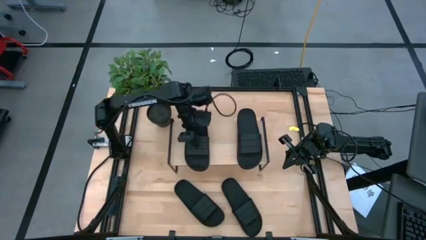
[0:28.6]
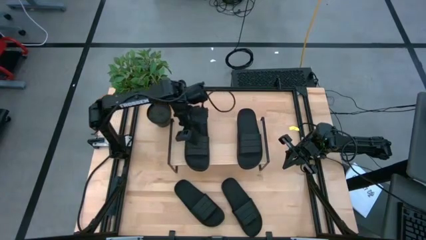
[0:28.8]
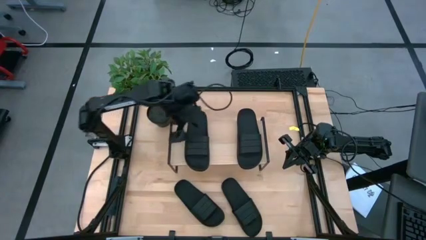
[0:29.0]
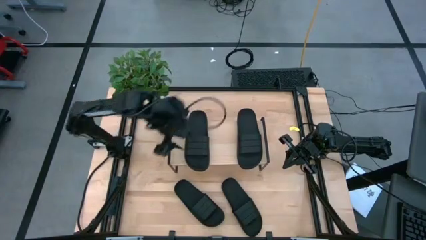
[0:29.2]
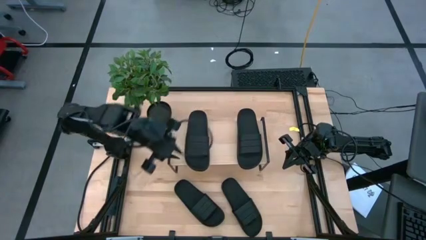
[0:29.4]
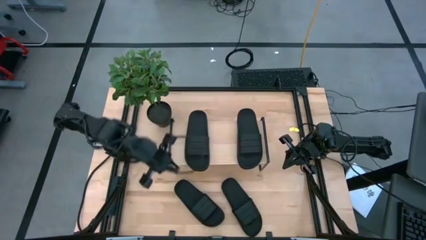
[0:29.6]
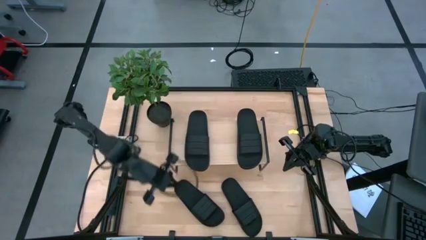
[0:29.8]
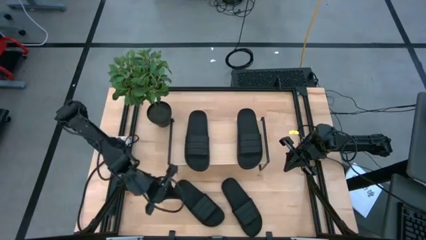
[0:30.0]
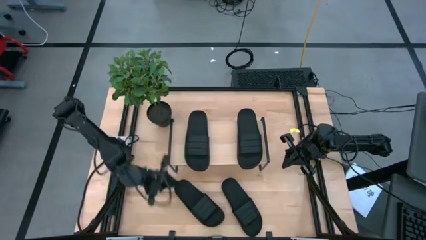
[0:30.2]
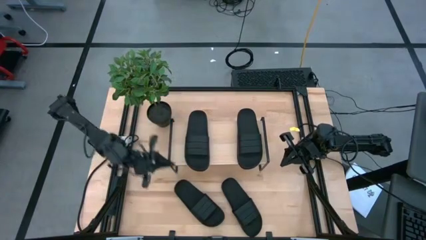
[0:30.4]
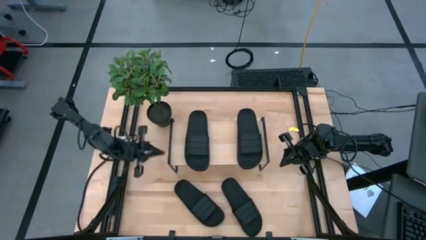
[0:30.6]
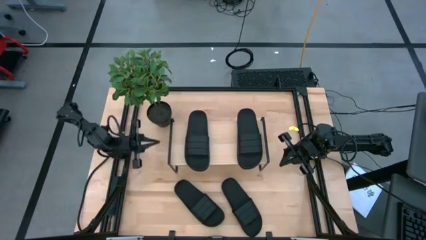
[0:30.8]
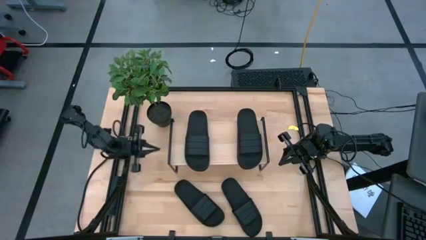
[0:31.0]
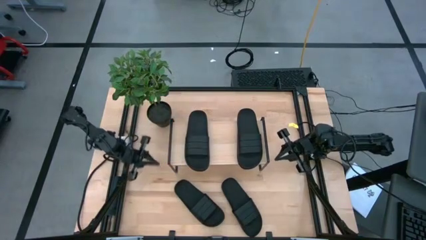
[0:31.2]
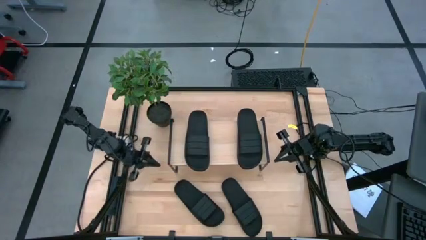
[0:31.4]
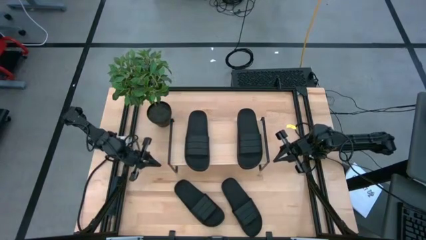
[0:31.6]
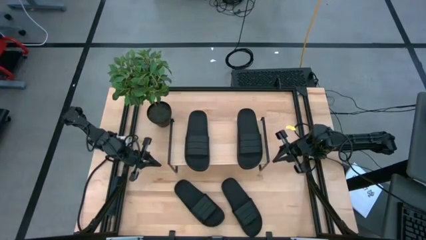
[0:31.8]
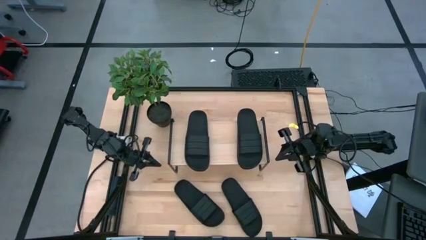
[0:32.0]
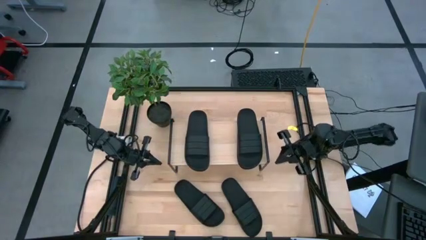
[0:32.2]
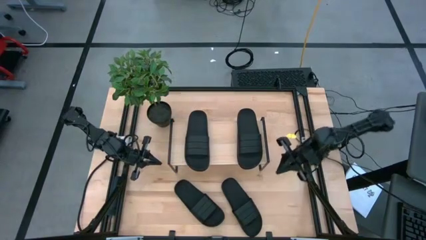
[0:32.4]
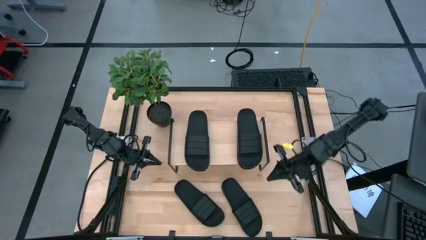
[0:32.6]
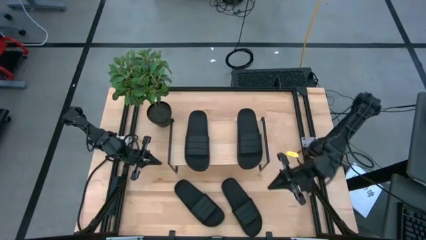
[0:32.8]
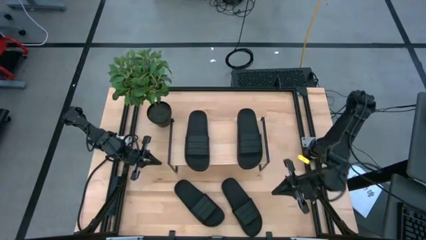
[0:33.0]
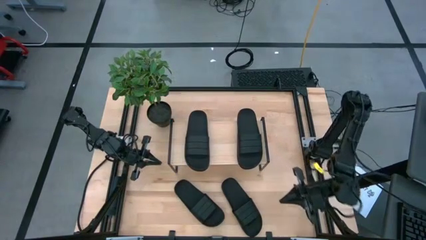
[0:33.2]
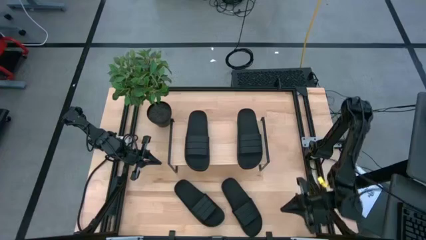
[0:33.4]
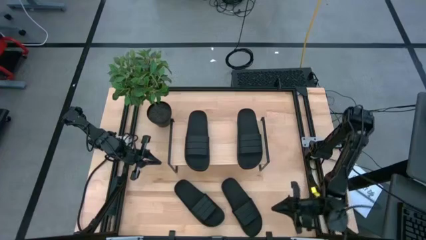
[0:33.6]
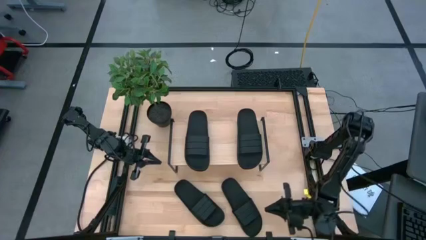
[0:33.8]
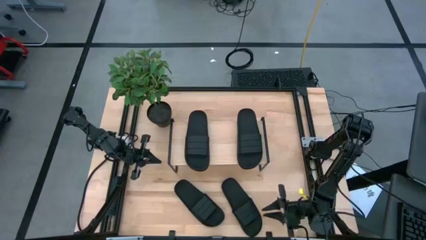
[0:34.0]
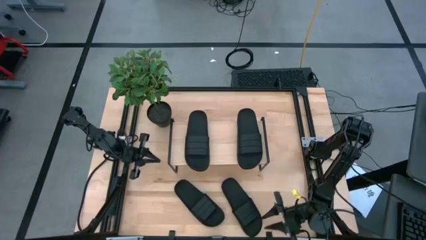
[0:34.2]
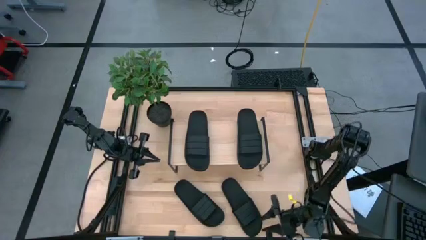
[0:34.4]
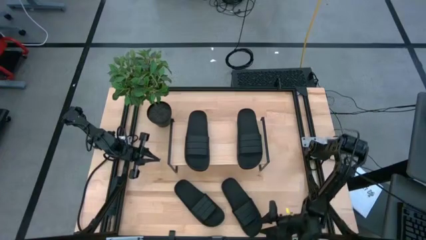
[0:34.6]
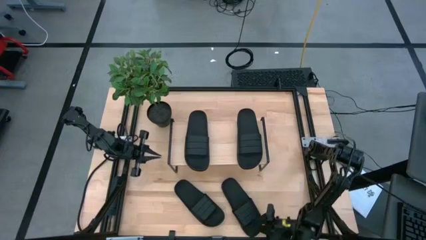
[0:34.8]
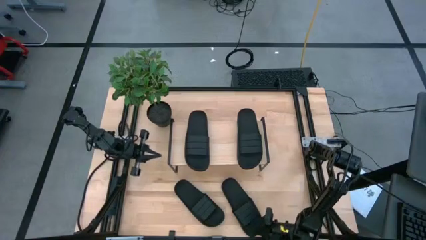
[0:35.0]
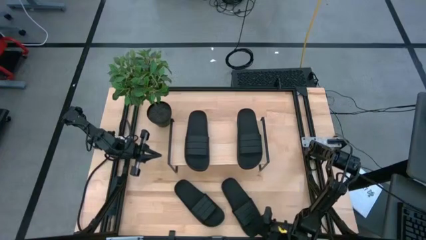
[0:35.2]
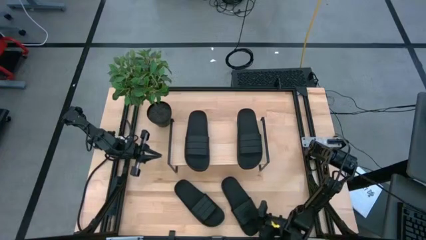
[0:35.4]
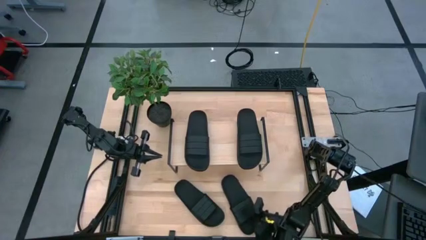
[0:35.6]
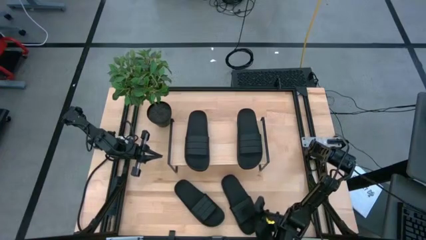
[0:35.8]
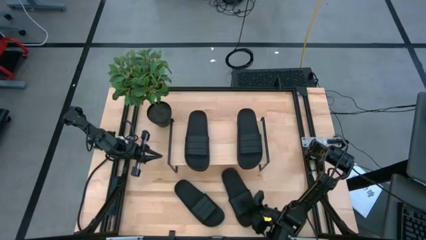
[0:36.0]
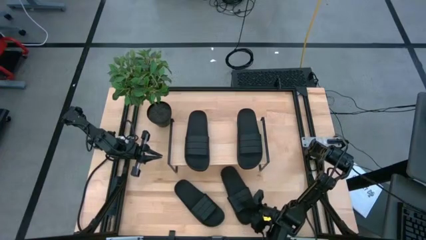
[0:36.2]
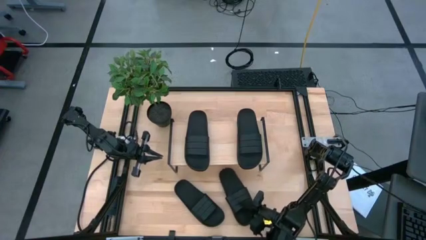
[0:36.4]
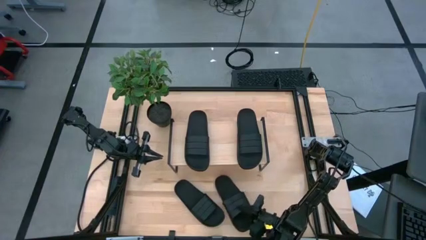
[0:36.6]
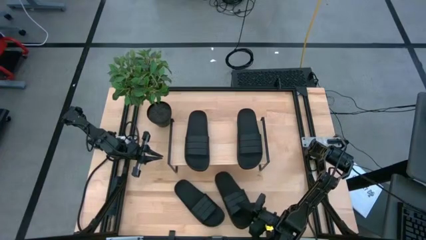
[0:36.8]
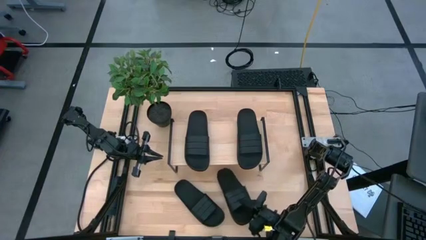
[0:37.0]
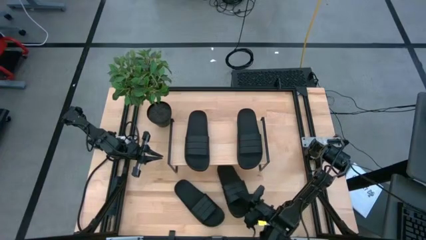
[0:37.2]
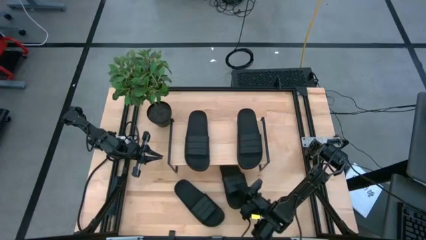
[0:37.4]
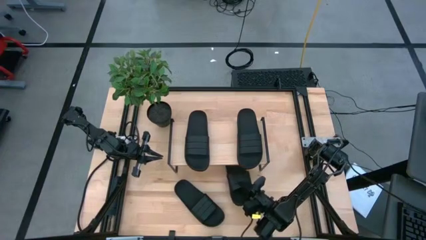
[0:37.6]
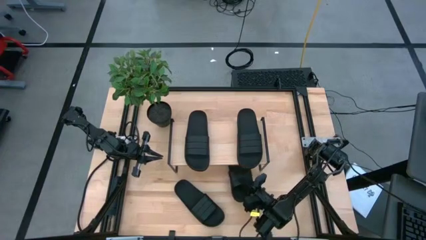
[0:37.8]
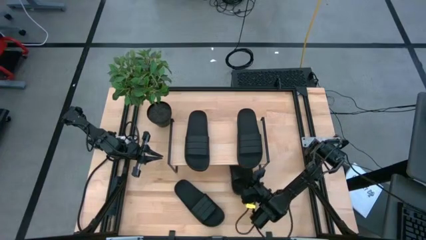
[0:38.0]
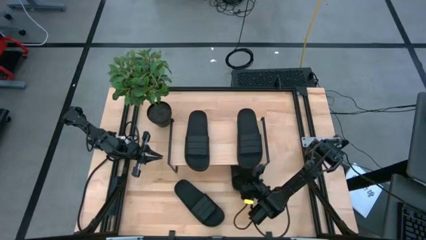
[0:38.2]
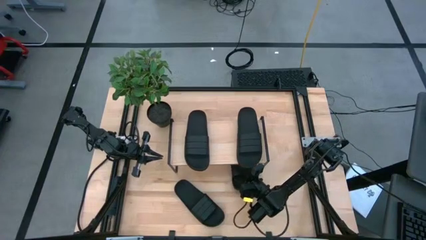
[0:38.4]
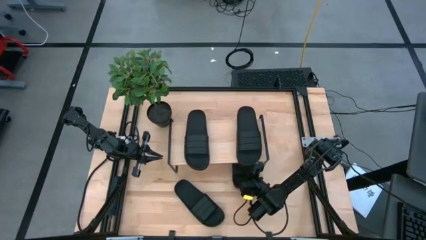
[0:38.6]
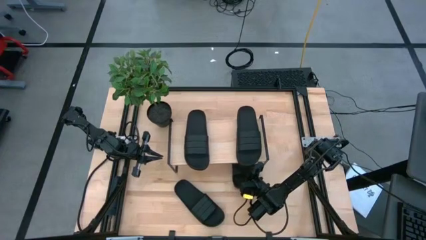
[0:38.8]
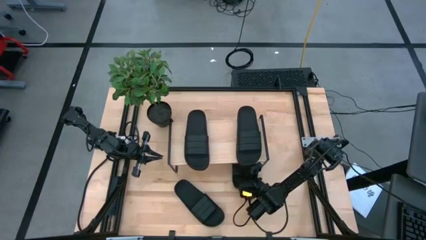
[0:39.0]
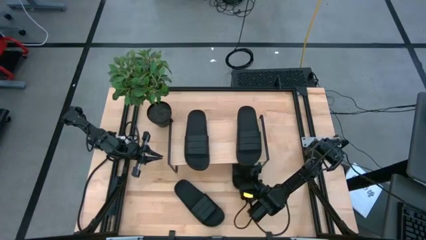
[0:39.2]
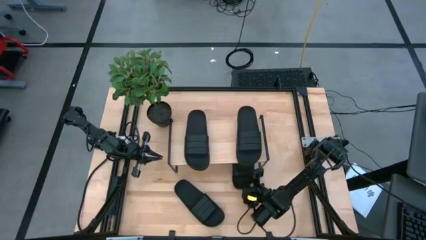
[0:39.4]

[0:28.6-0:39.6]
Task: Pick and place slides into the shelf
Put the black slipper under the shelf

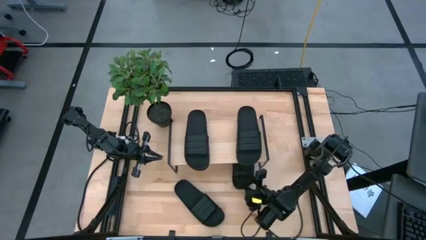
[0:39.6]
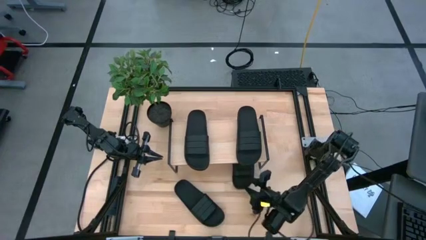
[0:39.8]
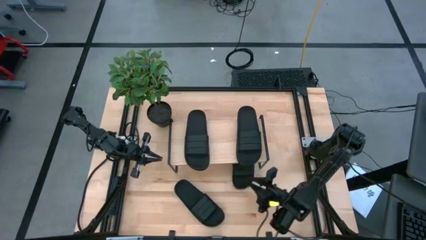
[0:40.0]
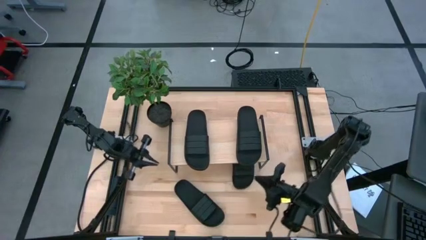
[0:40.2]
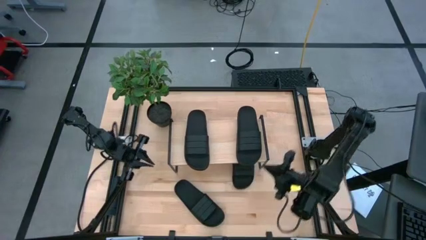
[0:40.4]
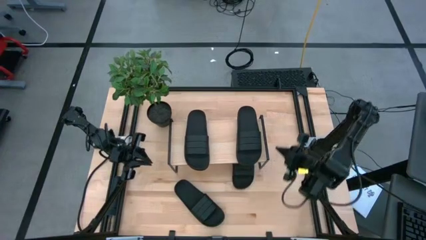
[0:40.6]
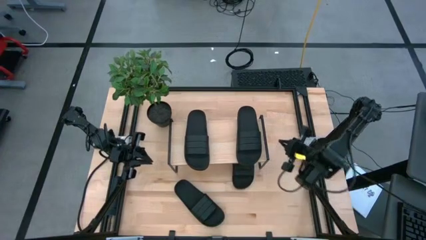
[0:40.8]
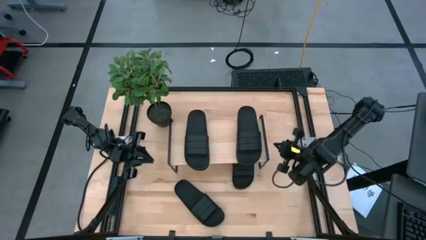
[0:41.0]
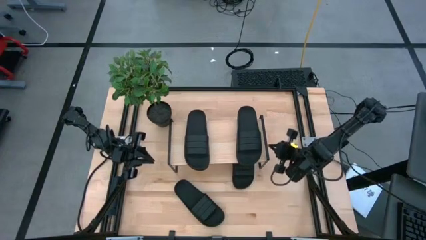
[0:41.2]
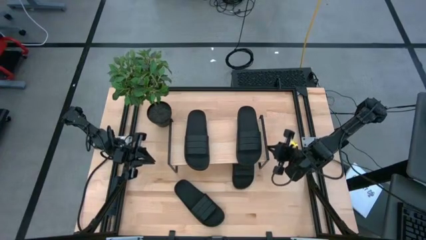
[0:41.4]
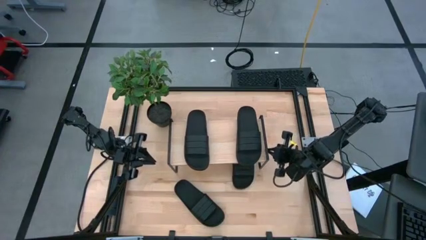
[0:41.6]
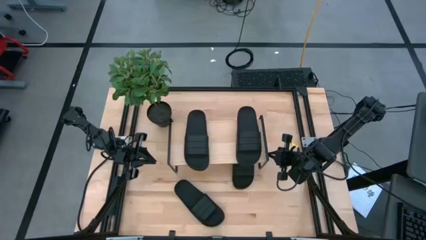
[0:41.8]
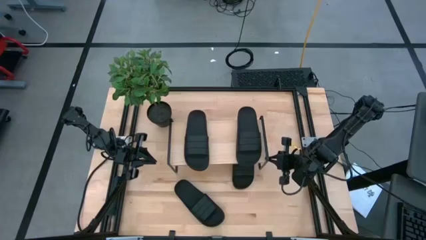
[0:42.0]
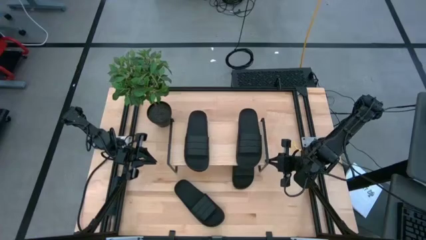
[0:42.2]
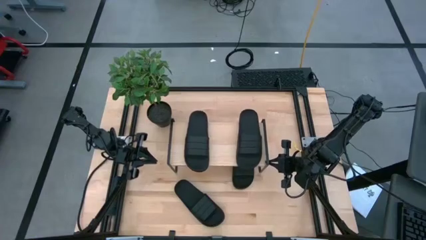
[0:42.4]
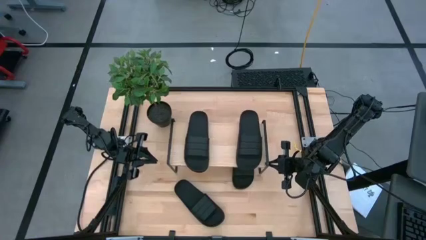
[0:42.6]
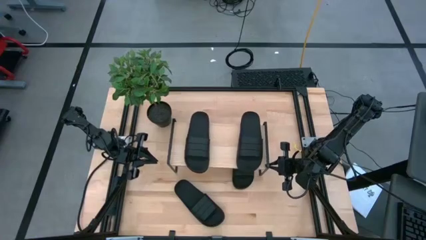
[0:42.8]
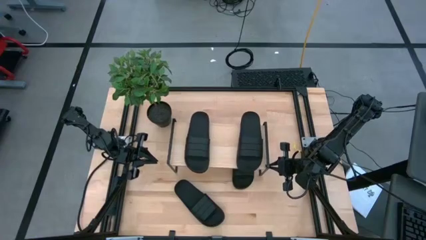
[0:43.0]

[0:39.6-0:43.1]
Adjust the shelf

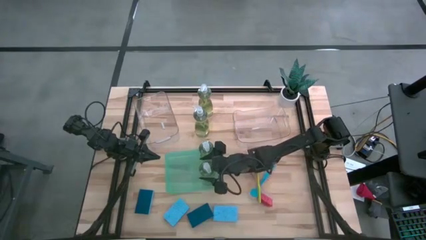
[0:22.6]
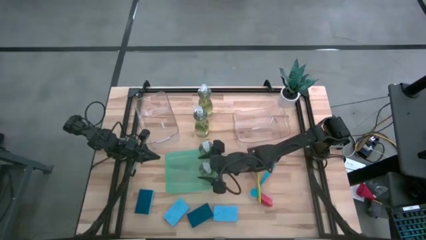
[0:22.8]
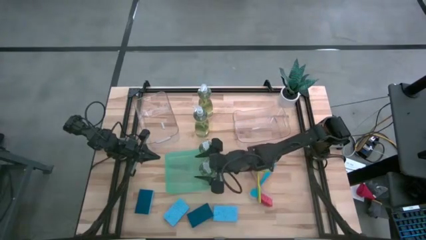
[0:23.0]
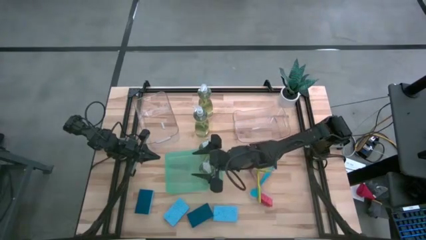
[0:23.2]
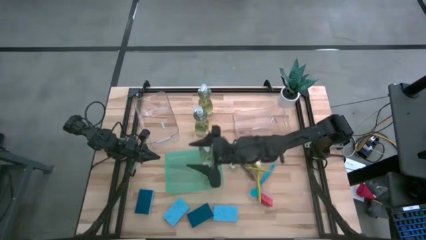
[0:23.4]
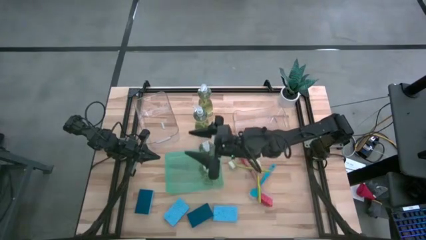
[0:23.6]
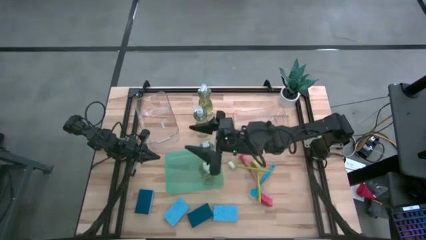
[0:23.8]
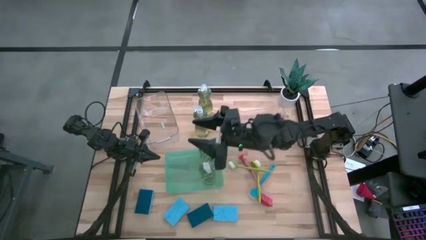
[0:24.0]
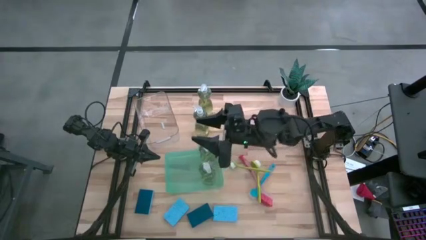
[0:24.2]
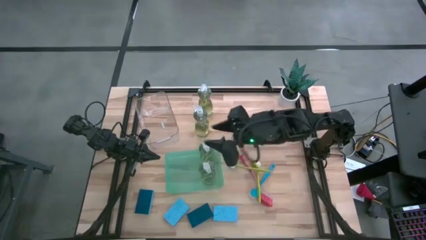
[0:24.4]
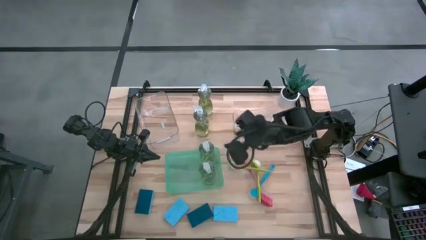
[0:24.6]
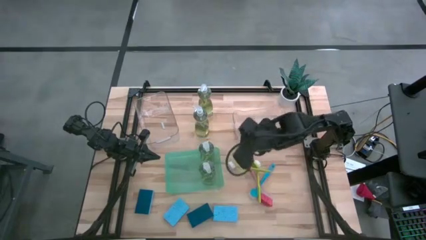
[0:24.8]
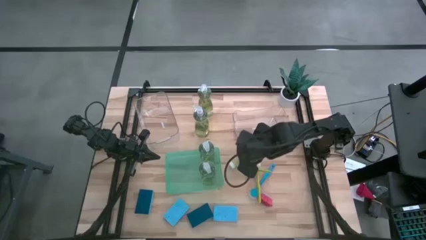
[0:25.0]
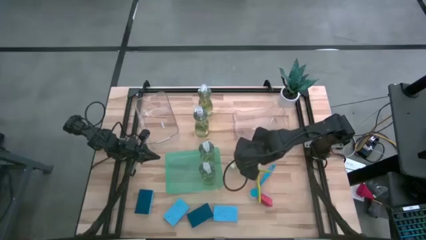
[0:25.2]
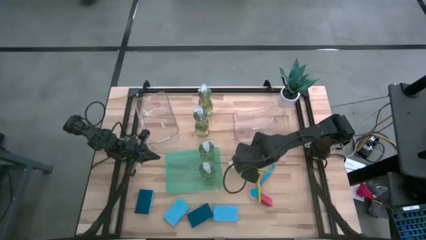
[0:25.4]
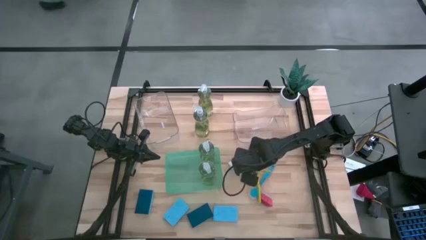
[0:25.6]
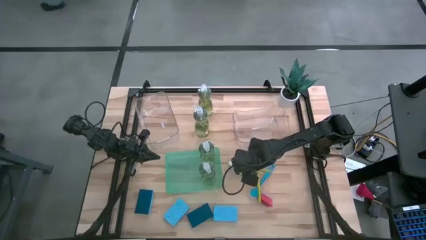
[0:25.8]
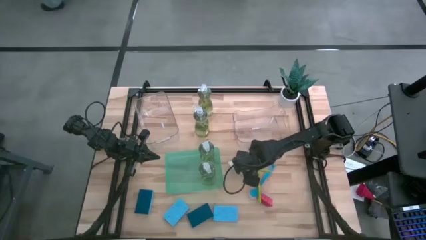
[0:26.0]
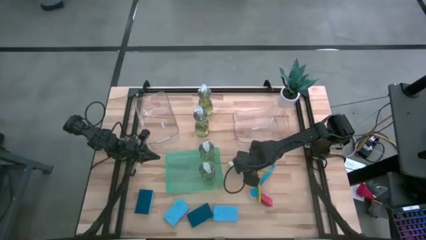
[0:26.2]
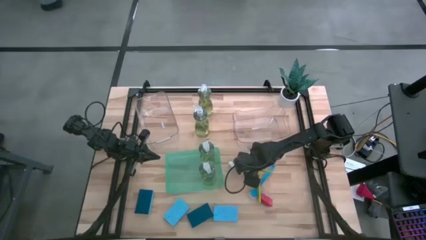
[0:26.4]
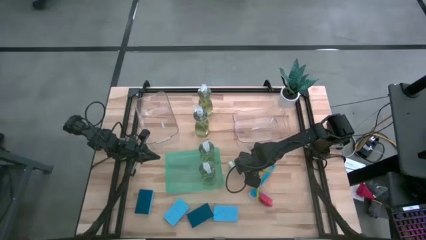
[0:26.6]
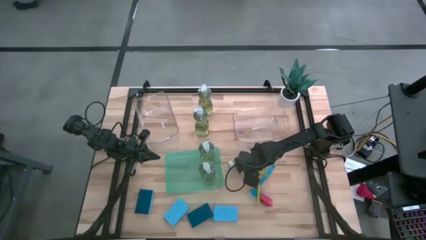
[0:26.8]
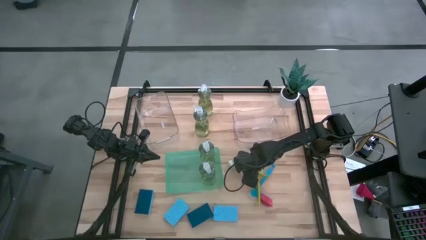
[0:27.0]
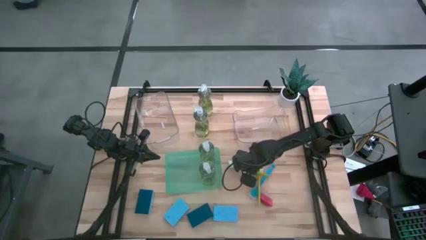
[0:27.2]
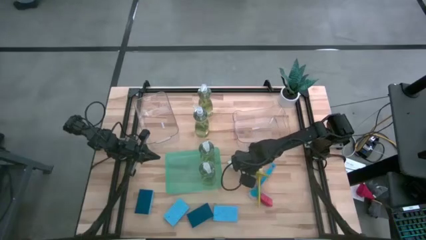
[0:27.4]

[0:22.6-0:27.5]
Task: Pick & Place Kitchen Sink Supplies
Put the yellow dish brush into the right transparent bin
